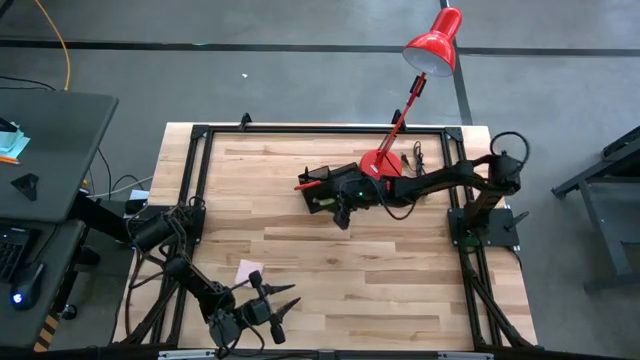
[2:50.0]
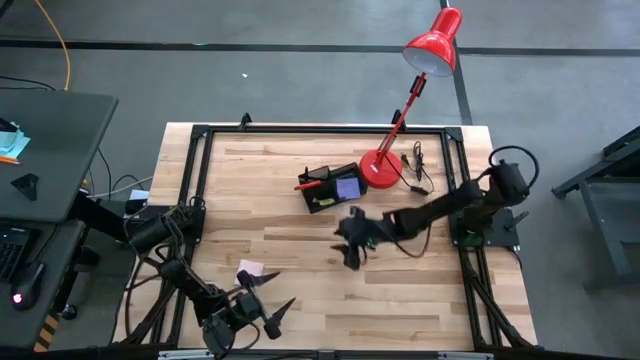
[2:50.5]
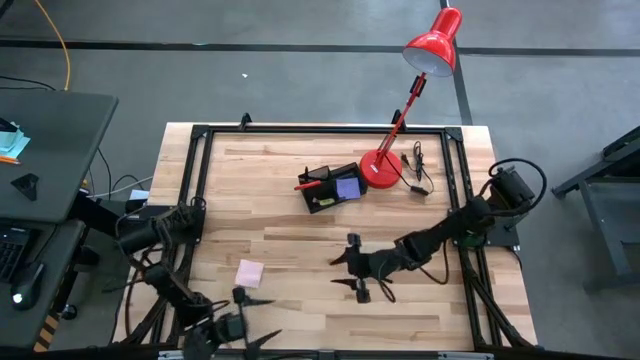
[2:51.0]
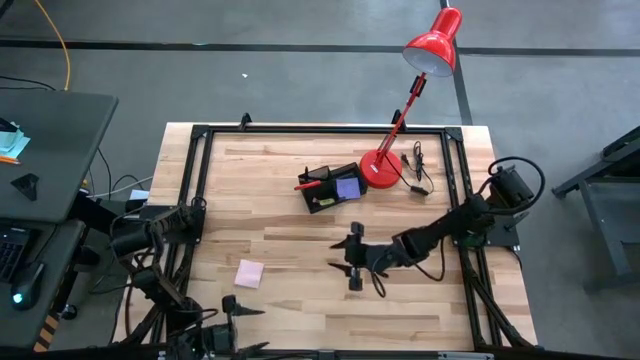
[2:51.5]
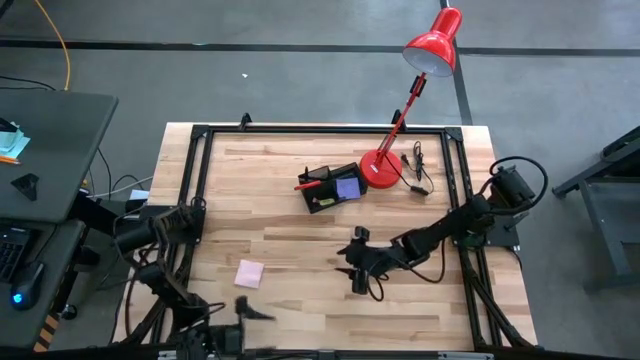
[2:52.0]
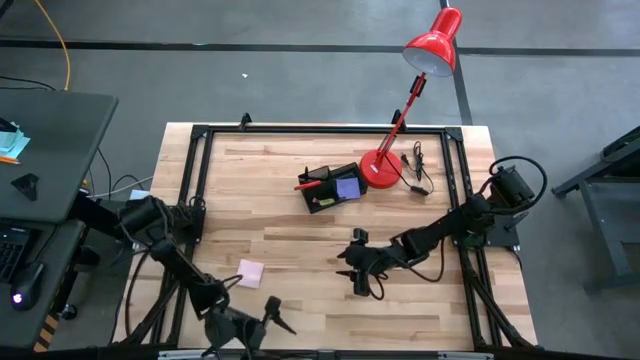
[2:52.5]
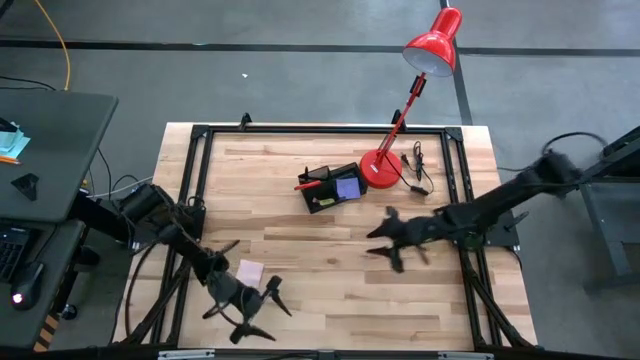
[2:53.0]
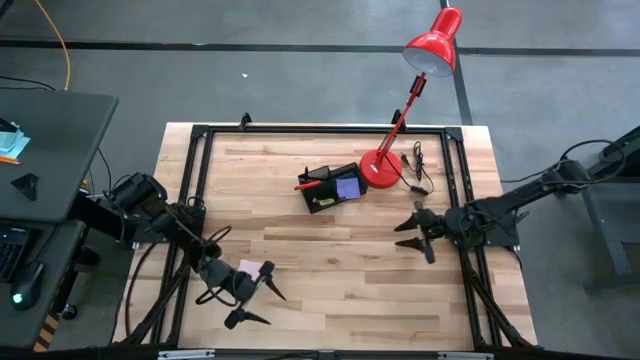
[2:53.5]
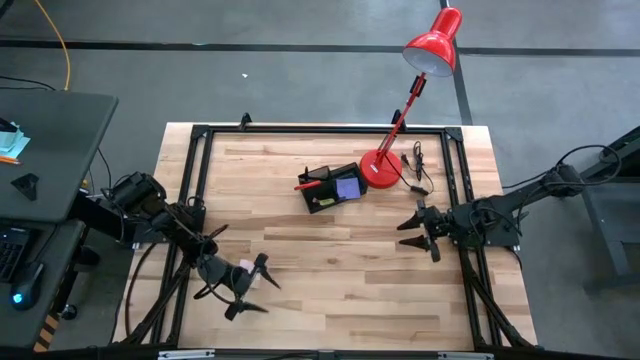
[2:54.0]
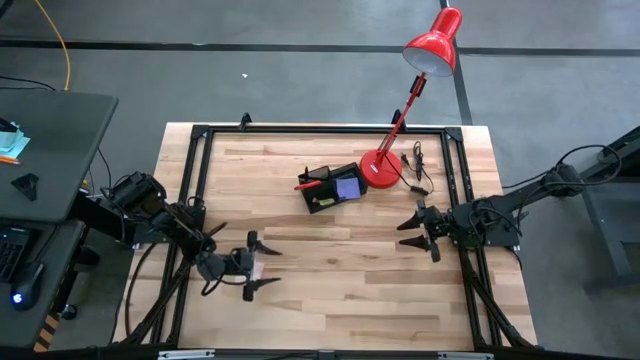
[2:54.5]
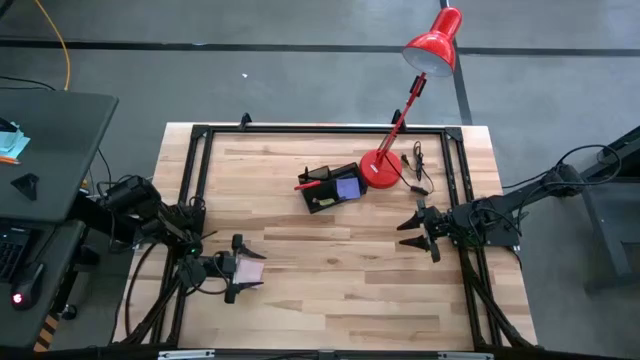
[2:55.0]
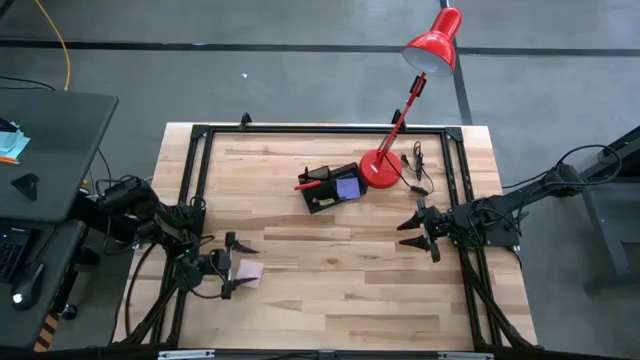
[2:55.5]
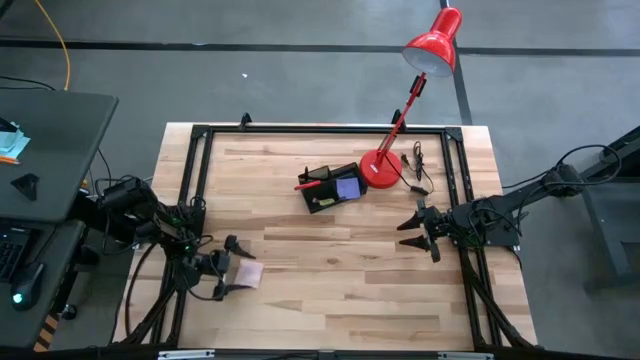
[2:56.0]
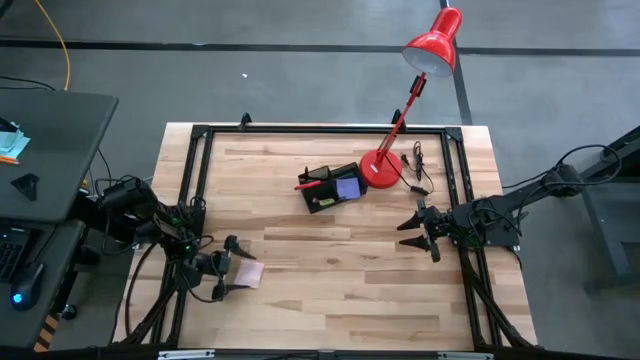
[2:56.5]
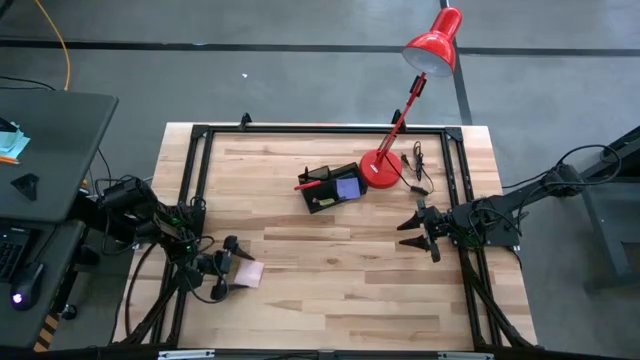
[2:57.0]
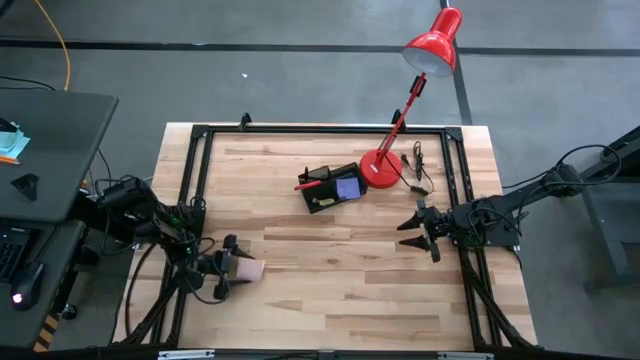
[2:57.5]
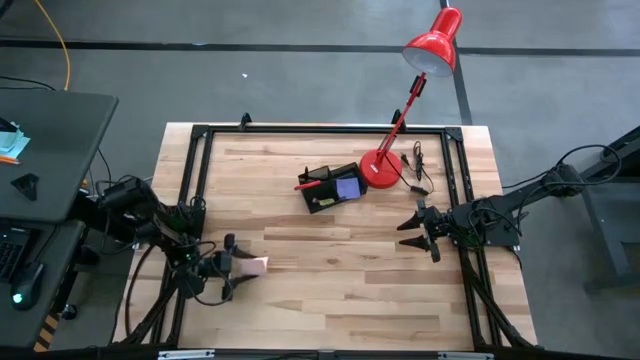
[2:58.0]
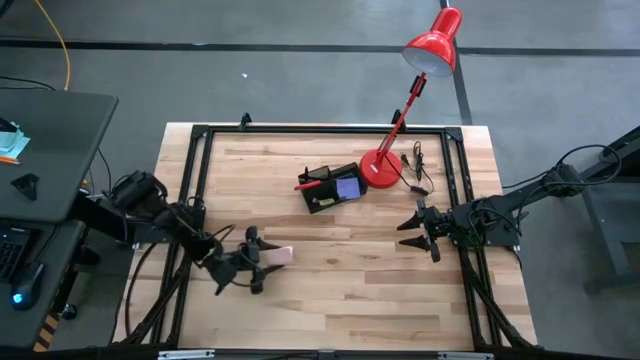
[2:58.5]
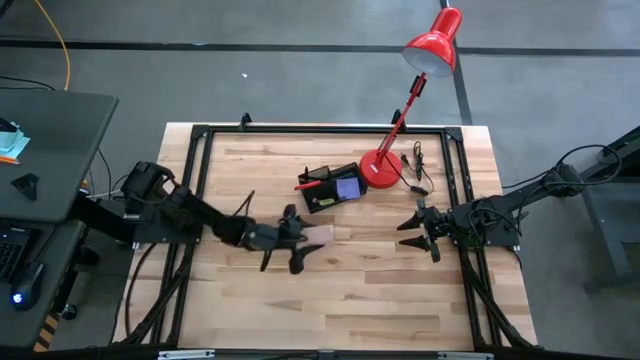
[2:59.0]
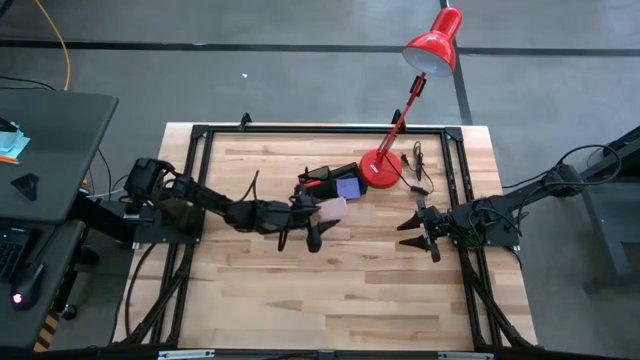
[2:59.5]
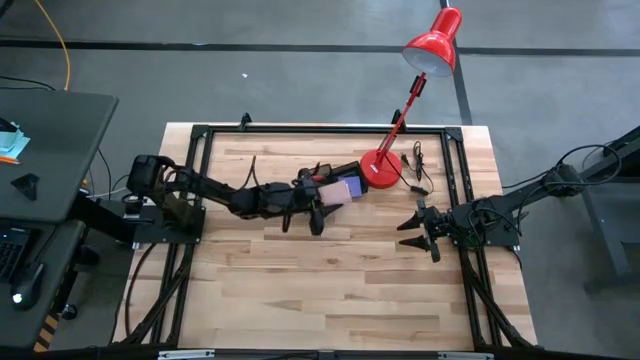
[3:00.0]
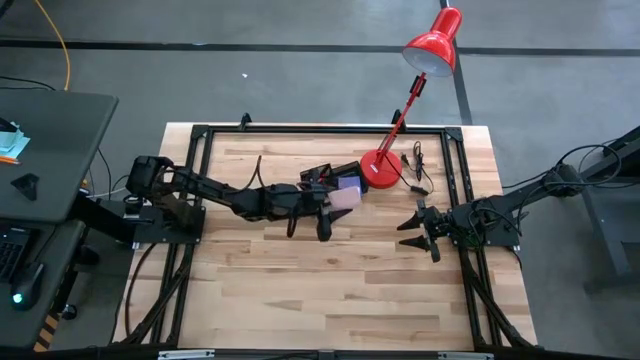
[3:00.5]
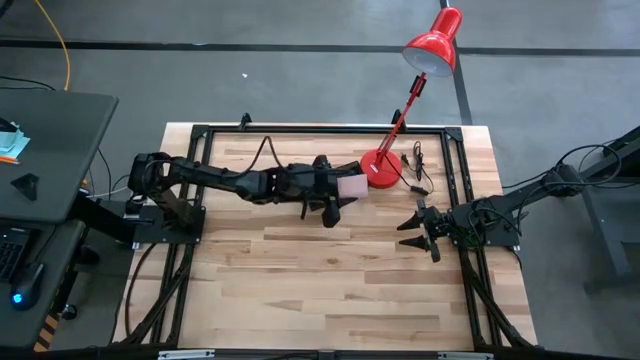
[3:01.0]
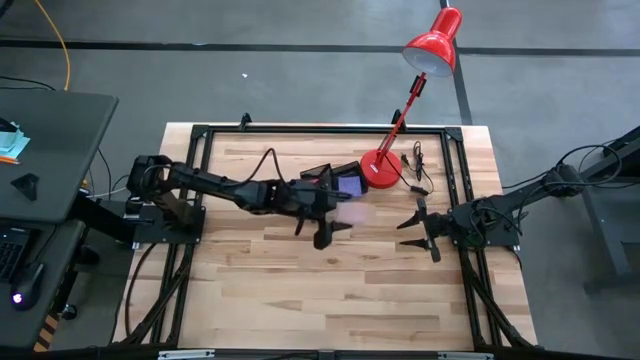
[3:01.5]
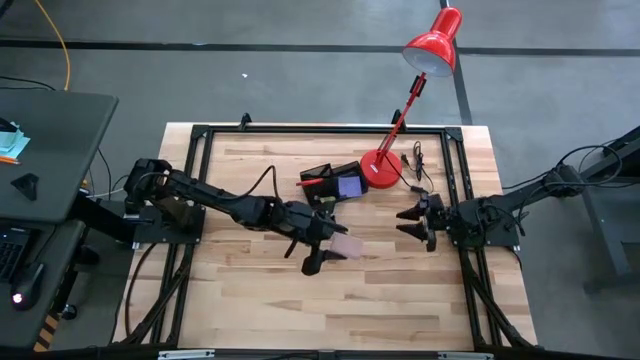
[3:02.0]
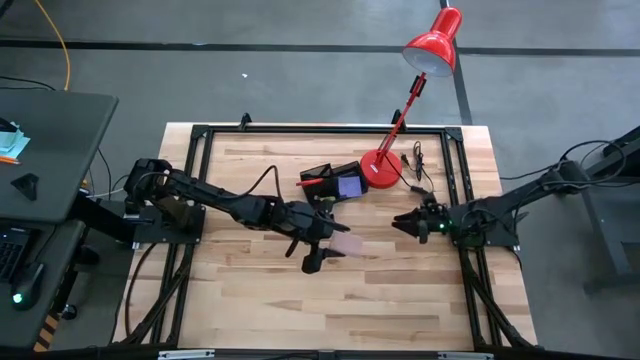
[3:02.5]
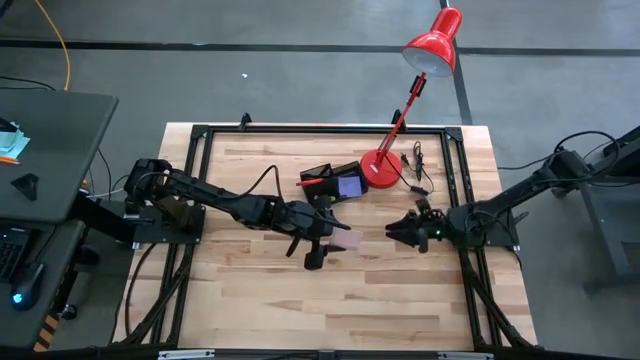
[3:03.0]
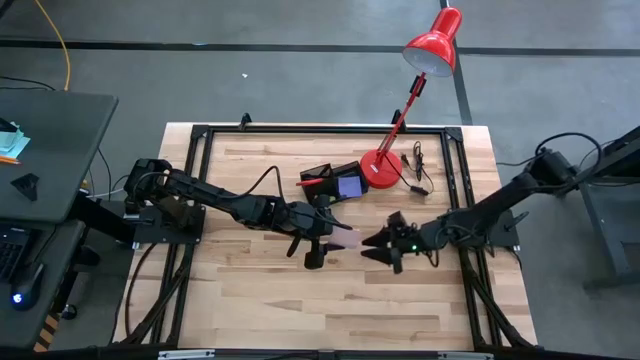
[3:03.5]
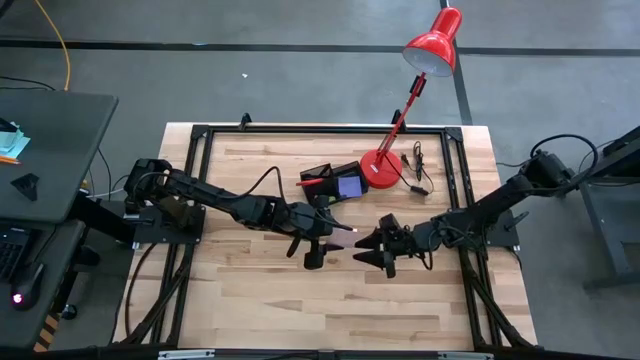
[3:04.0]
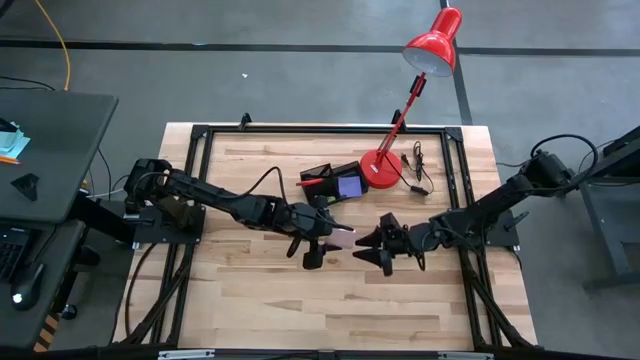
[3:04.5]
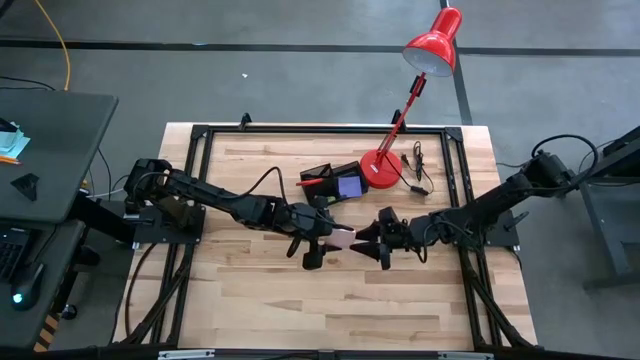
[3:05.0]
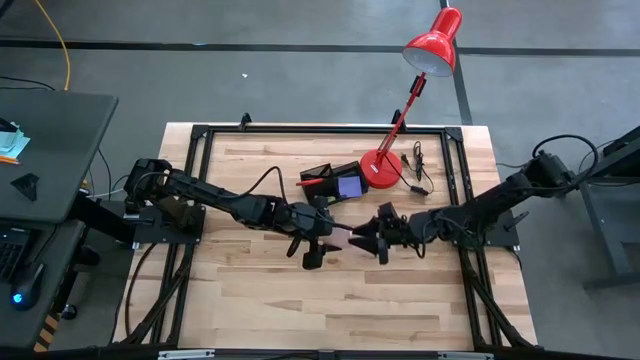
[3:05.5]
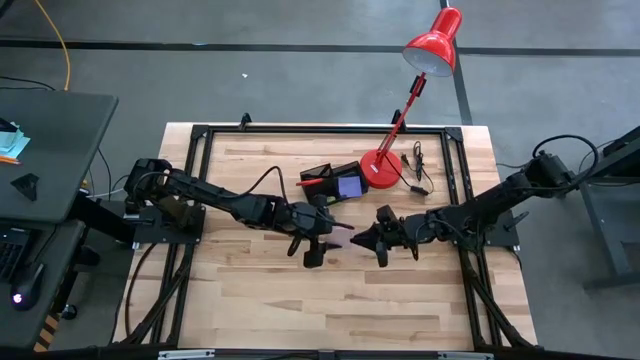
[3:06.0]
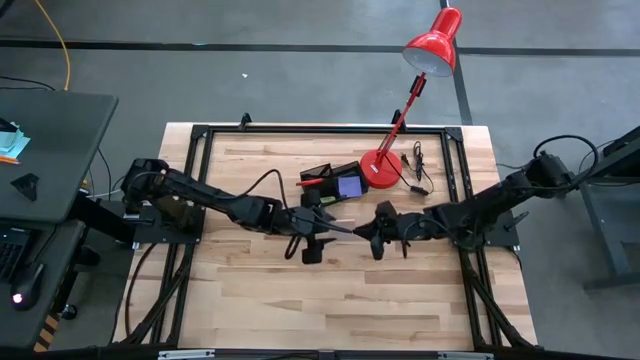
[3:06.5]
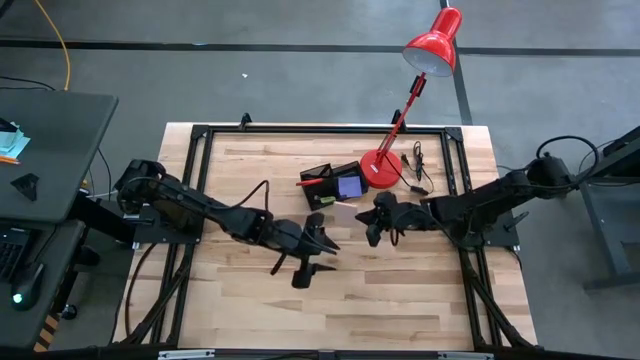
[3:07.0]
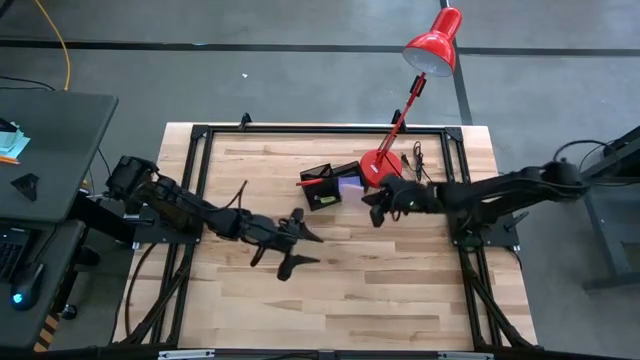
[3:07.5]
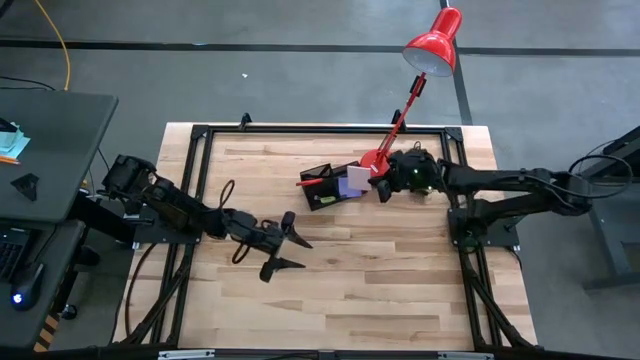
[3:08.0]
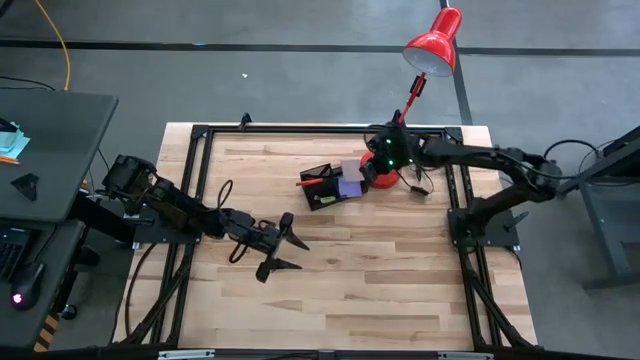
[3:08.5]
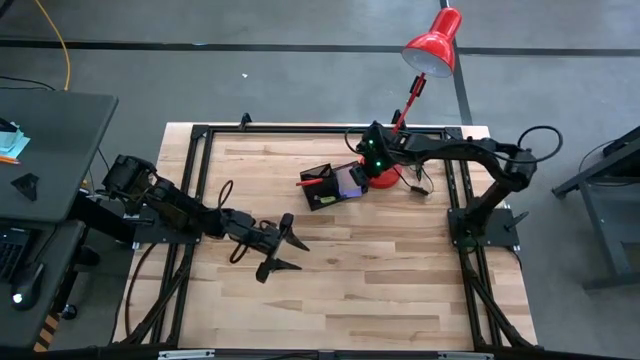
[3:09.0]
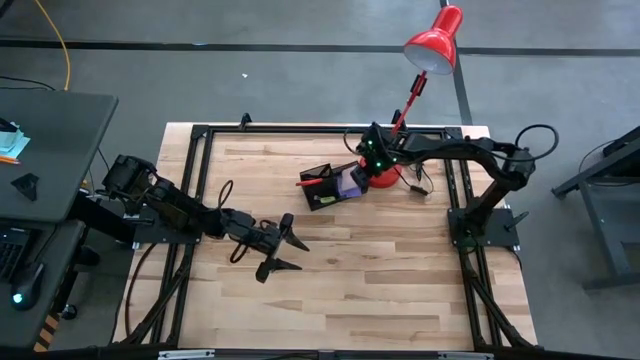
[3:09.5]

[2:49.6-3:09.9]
Task: Pick and place office supplies into organizer
Put the pink sticky notes into the black desk organizer

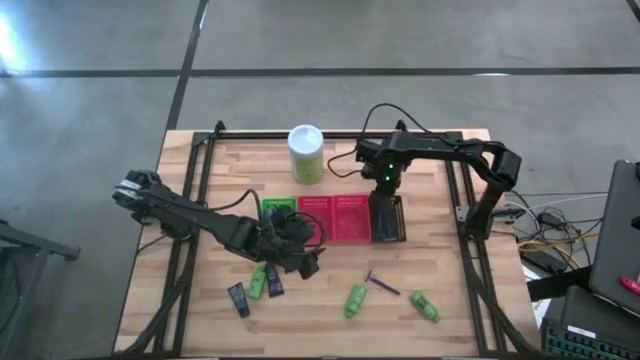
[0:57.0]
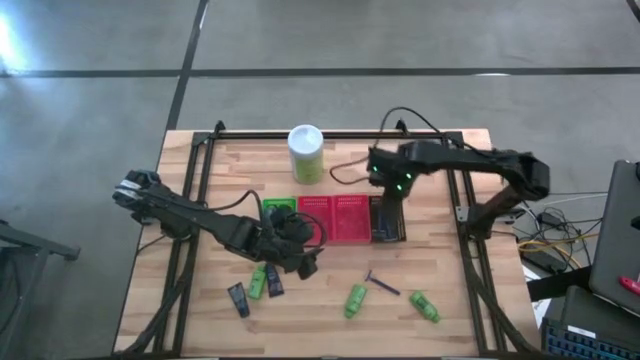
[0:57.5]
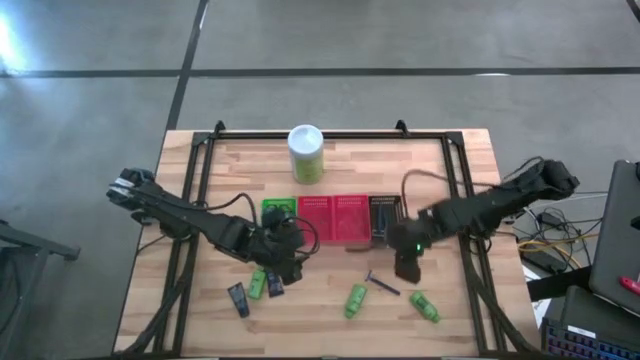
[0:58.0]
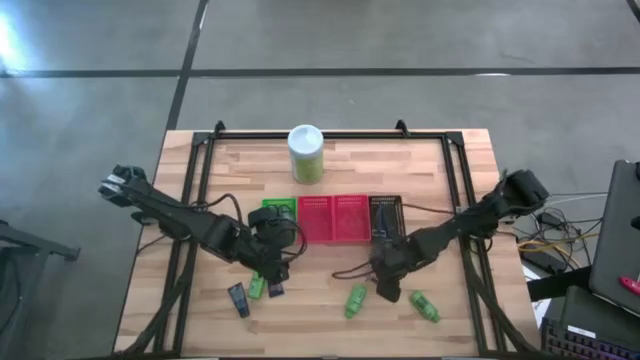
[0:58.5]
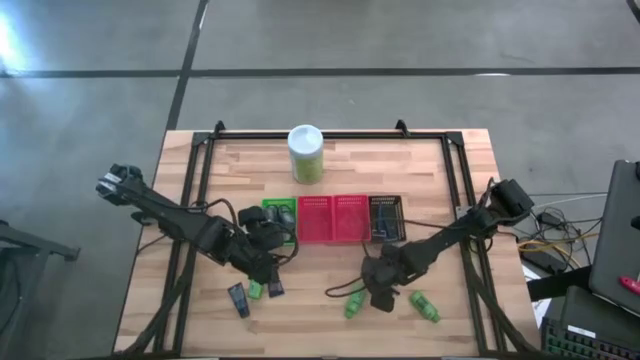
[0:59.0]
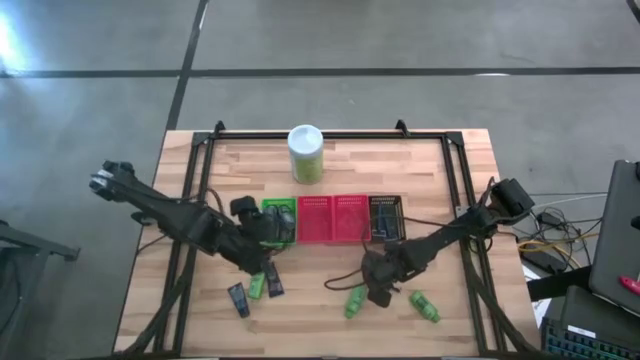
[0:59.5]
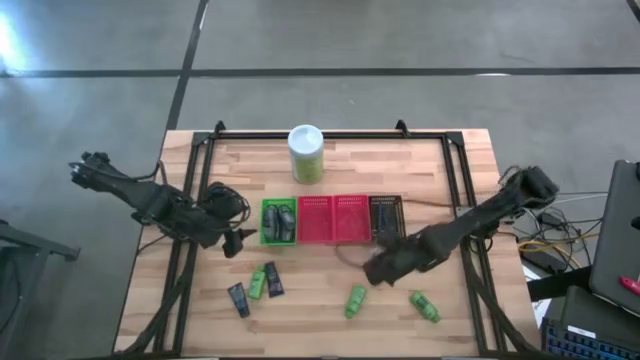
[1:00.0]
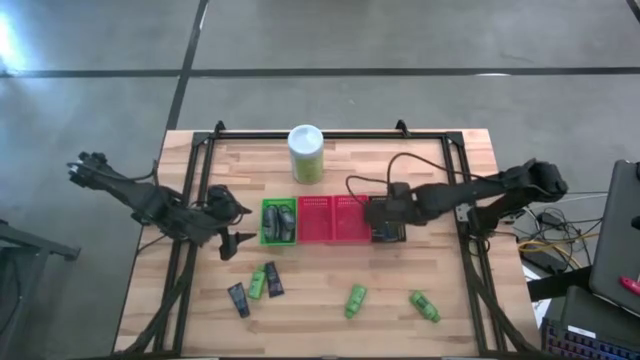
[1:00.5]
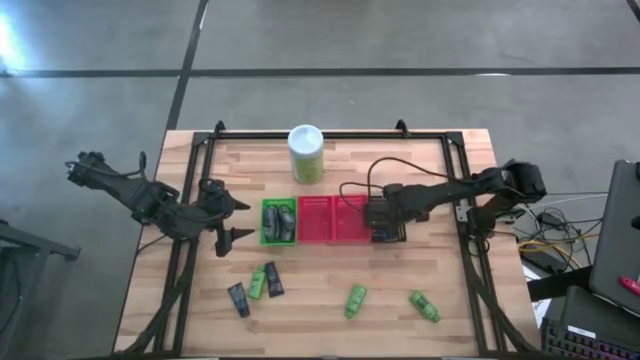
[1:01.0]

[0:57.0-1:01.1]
Task: Pick & Place Travel size toiletries
Put the blue razor into the black bin
